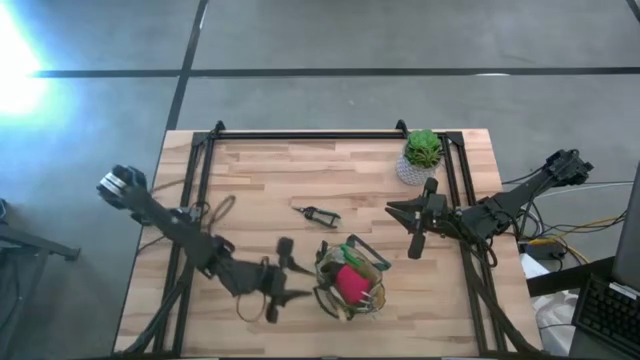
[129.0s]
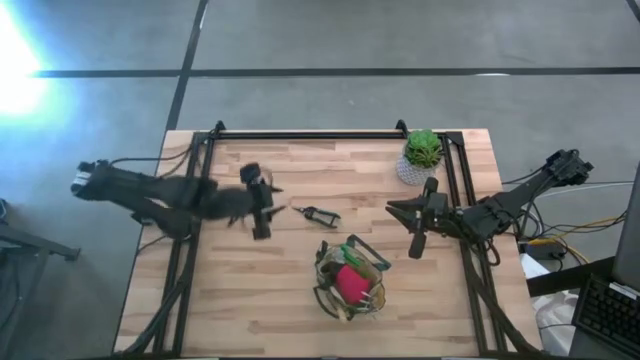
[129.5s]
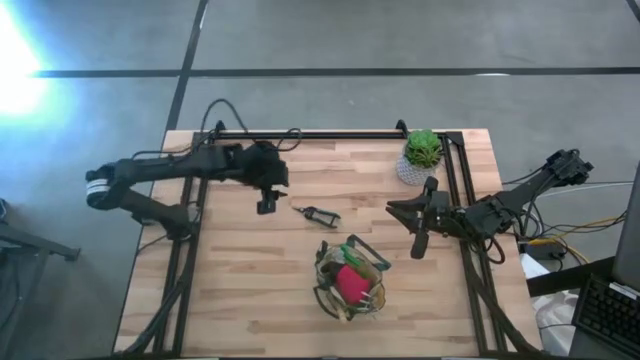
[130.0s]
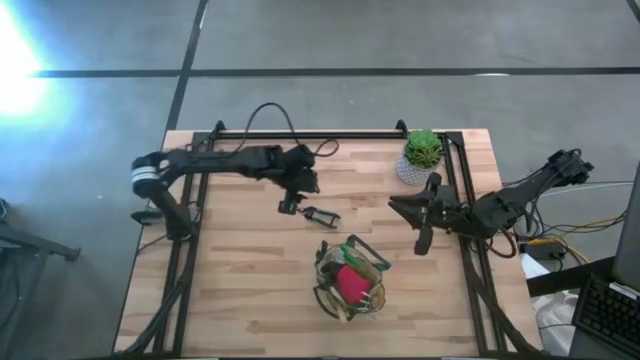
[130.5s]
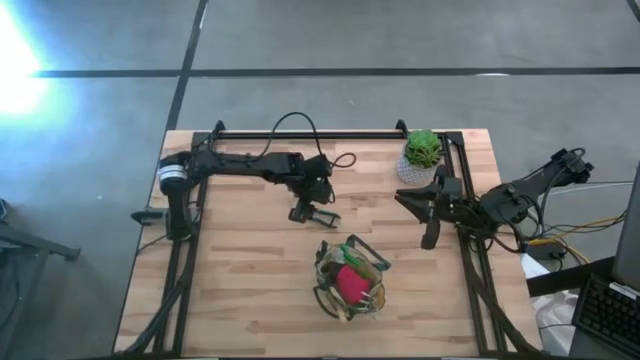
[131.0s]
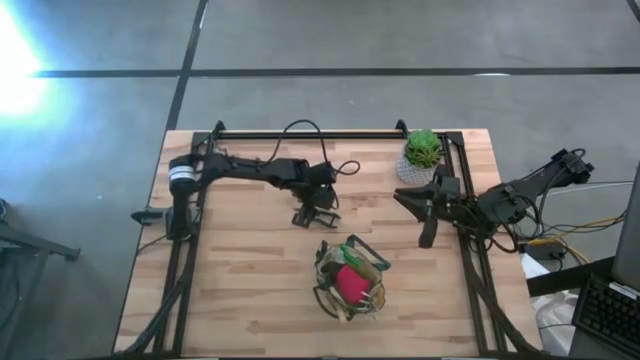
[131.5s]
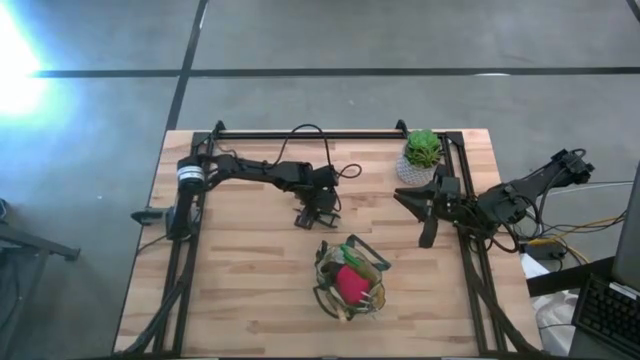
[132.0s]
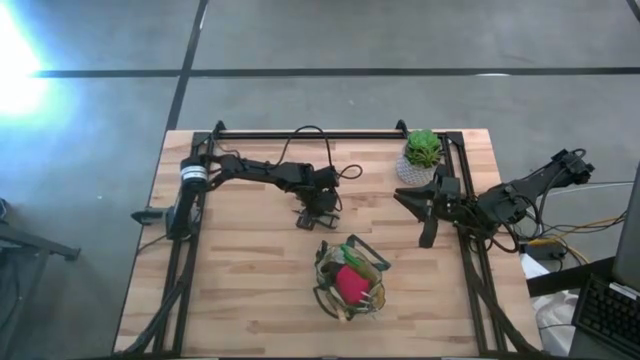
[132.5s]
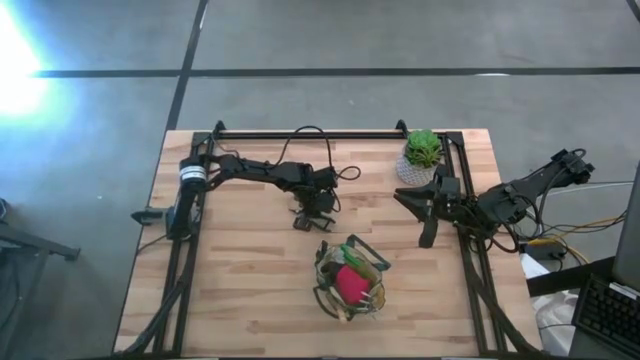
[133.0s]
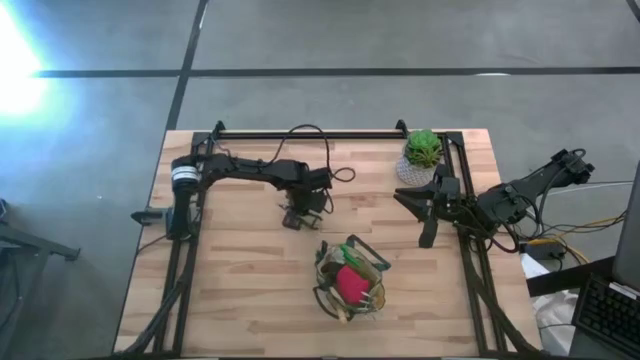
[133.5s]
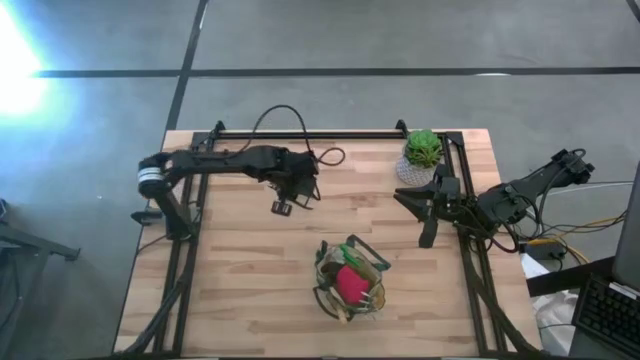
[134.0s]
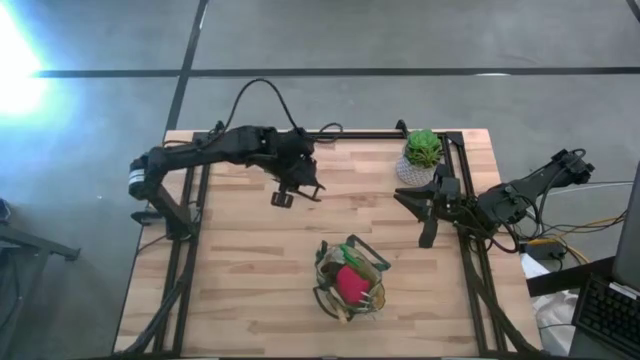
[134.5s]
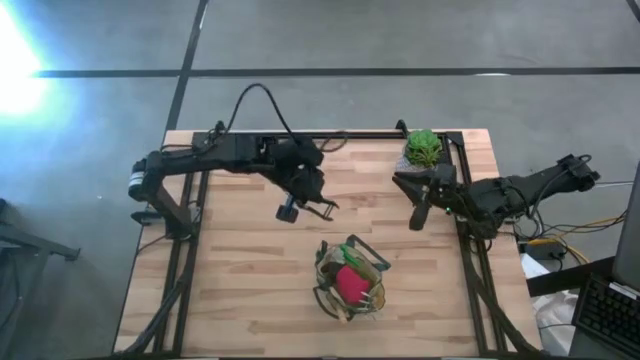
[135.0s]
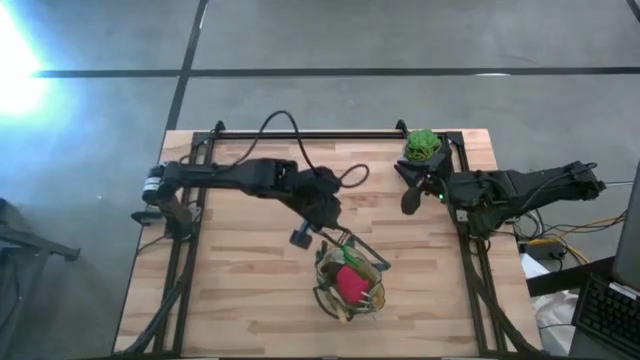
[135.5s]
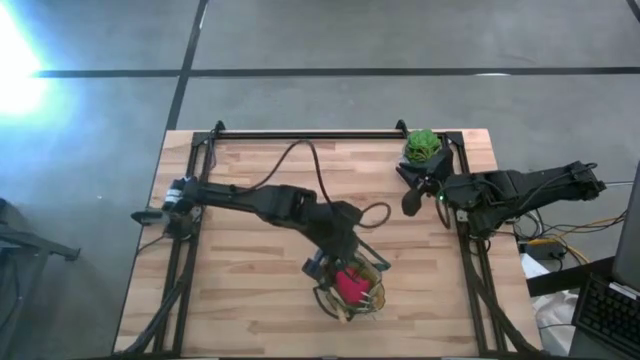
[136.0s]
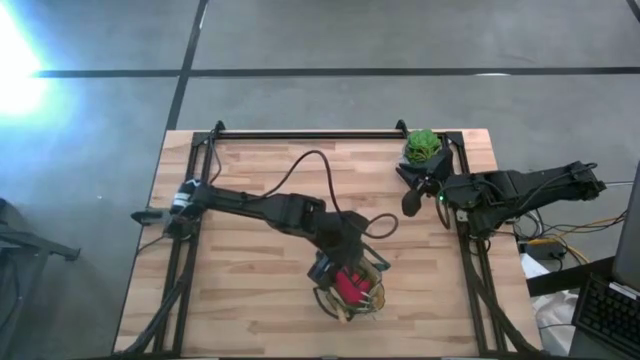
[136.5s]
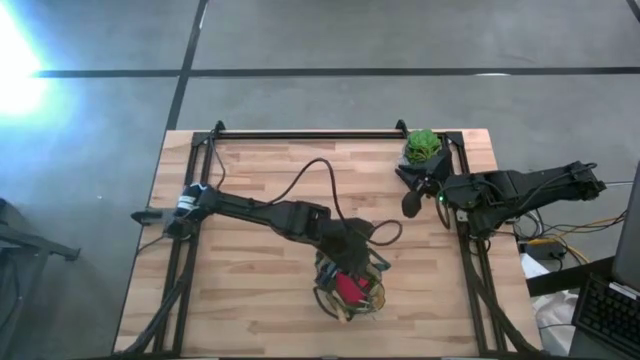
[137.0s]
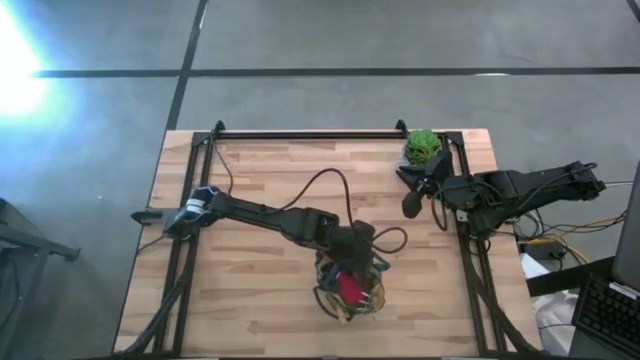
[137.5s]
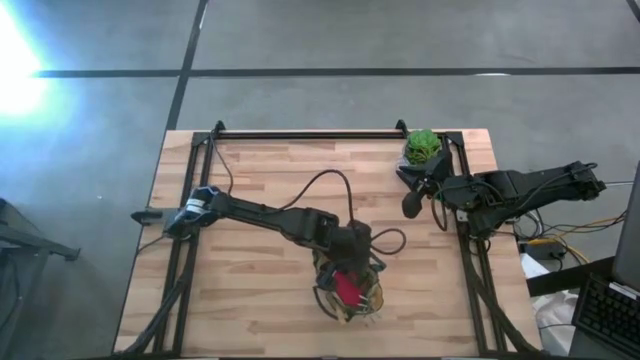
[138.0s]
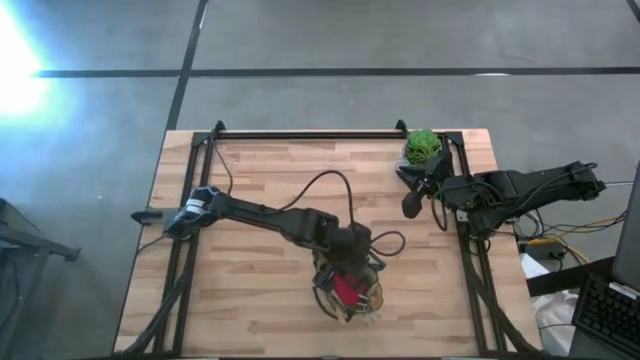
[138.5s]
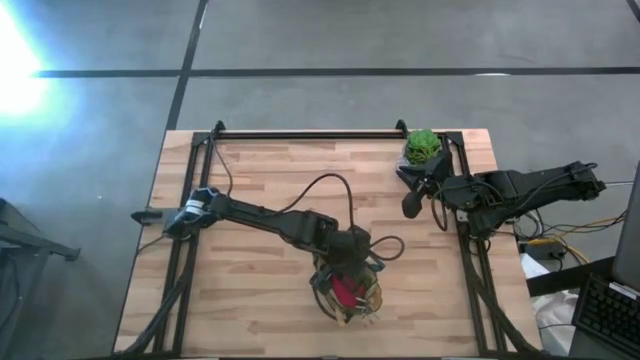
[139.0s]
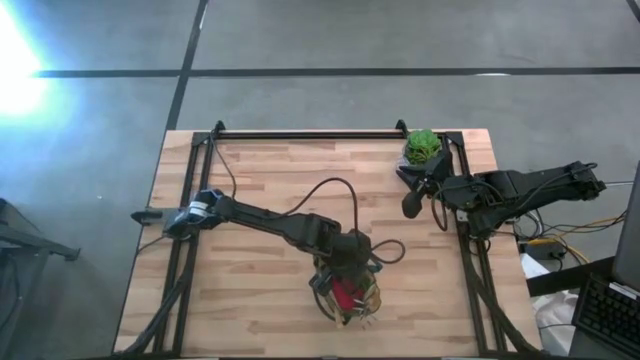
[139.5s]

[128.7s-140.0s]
Task: Pick & Place Garden tools in Gardening bag
Put the green shear scissors into the white gardening bag

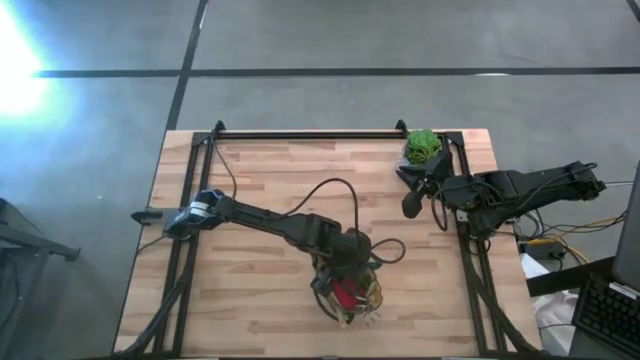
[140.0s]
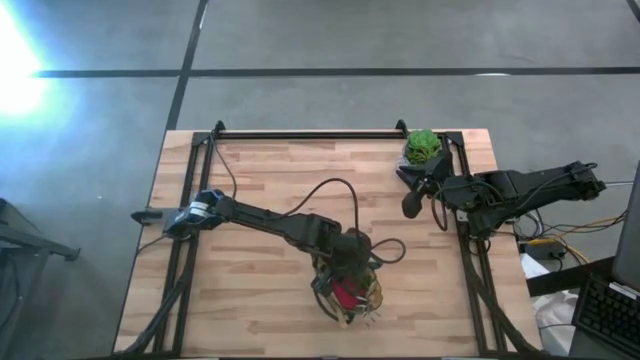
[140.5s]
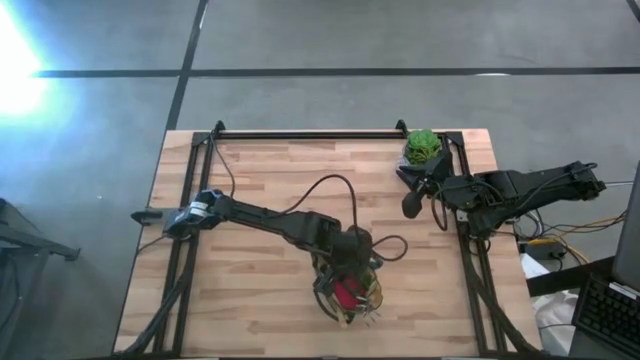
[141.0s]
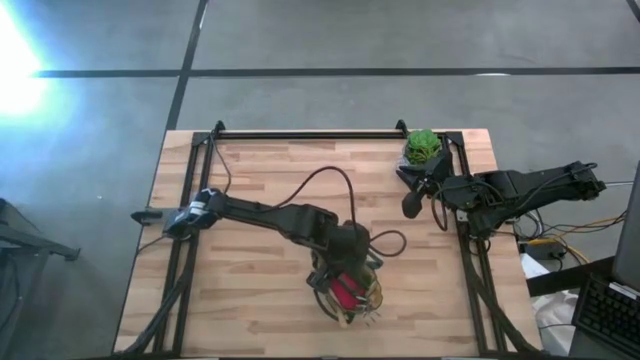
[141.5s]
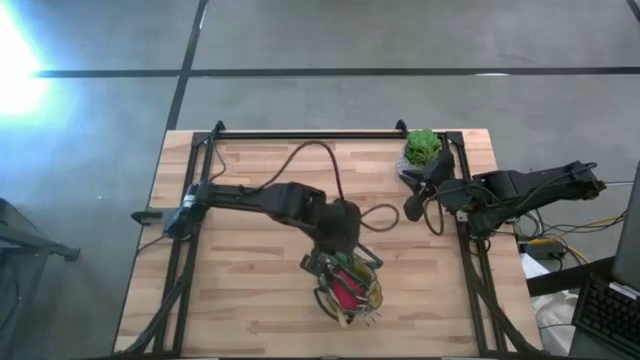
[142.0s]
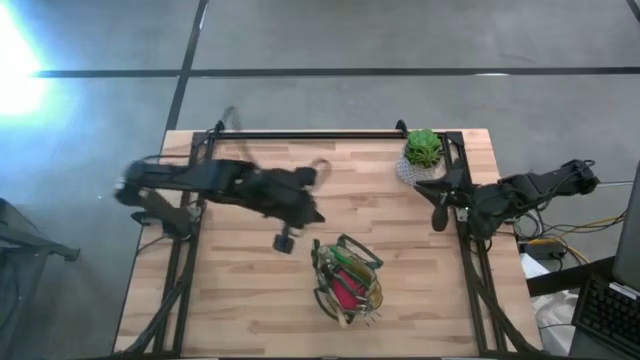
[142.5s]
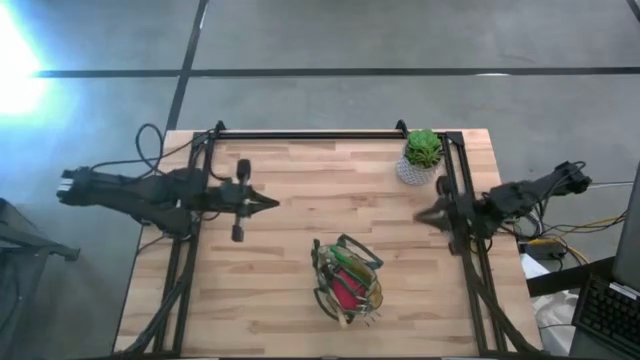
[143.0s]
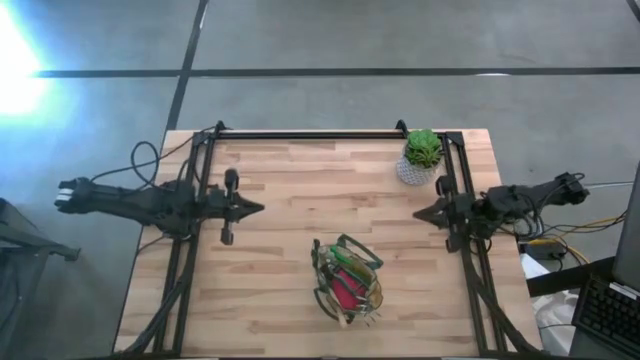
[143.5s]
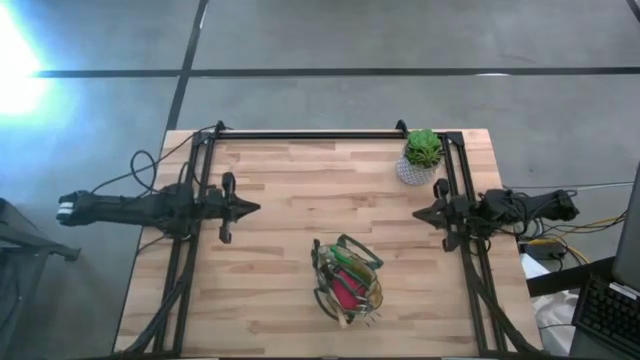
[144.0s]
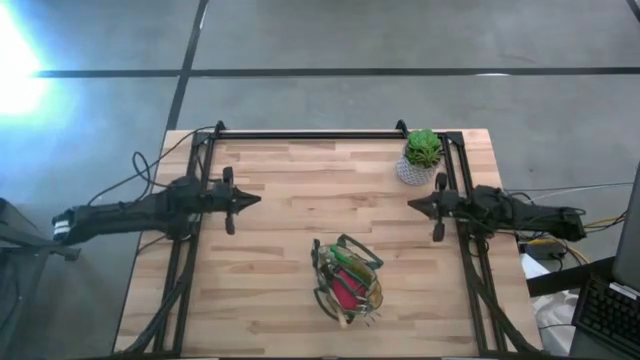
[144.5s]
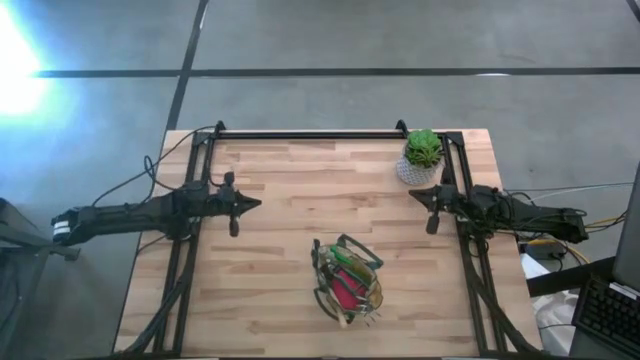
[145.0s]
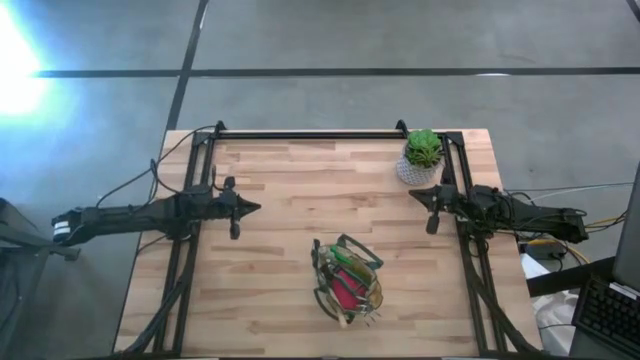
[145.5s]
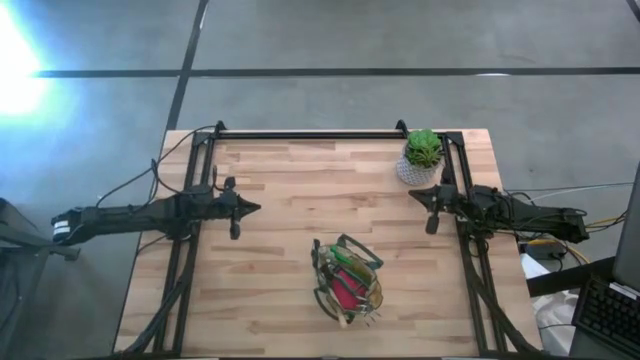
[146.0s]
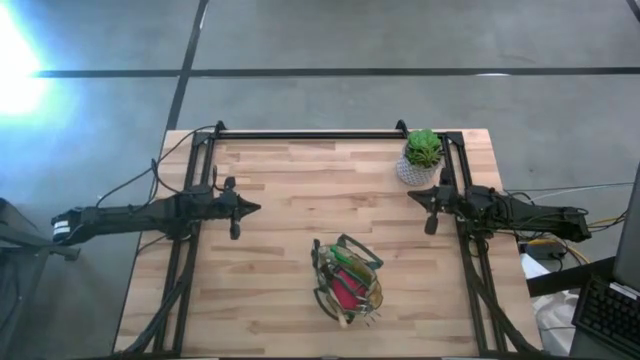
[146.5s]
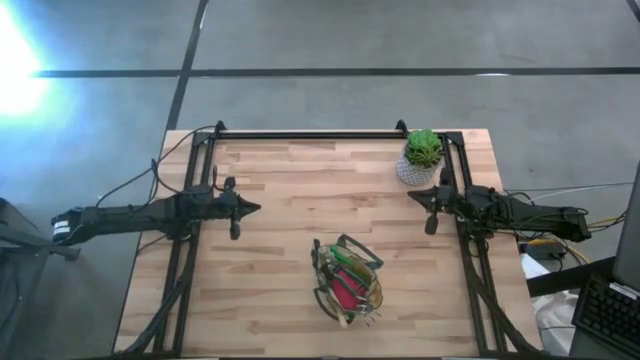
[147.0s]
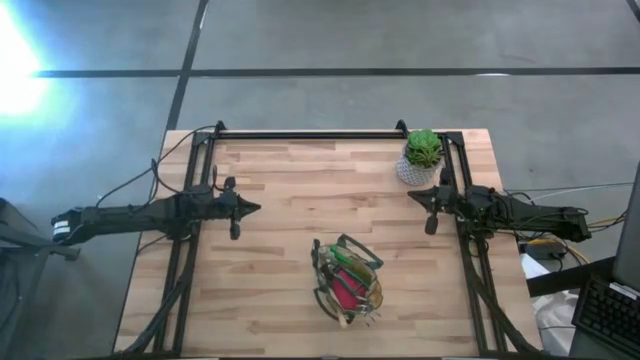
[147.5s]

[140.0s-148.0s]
Return to Home Position

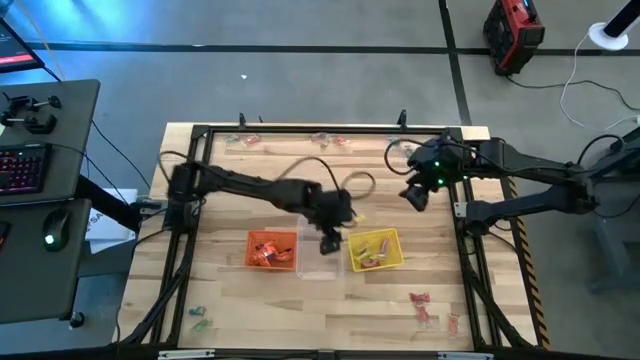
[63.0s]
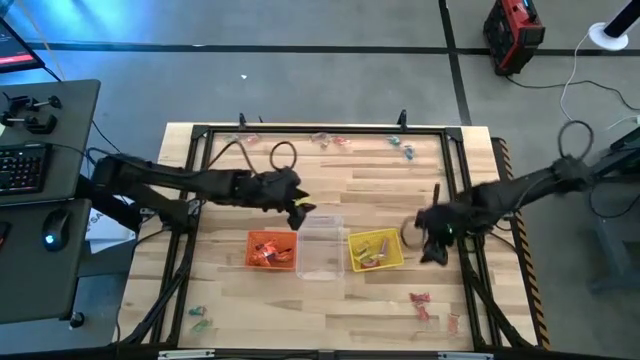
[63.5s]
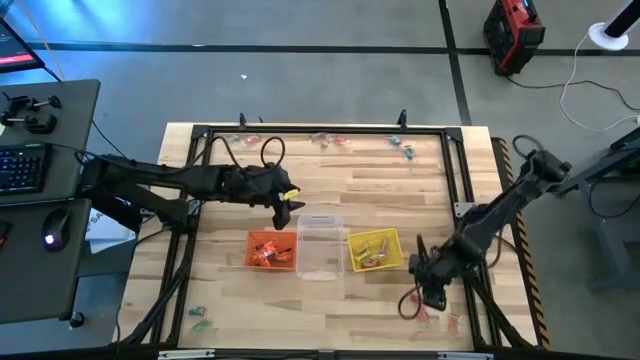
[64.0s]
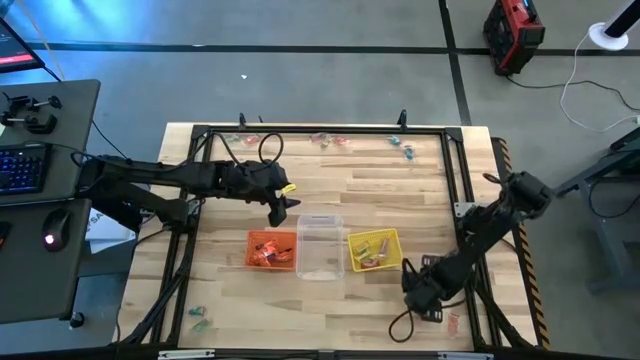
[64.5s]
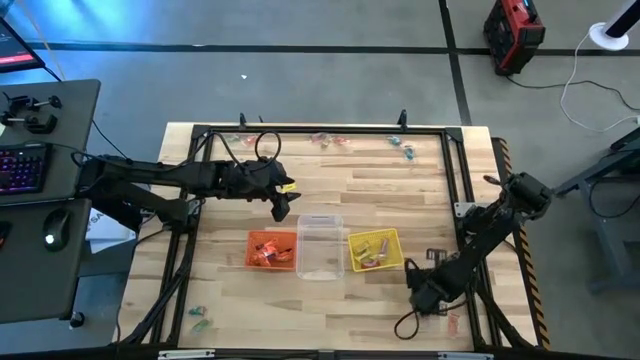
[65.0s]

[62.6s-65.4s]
Task: Sort candy by brand, put in halloween buckets
Put the red candy into the yellow bin

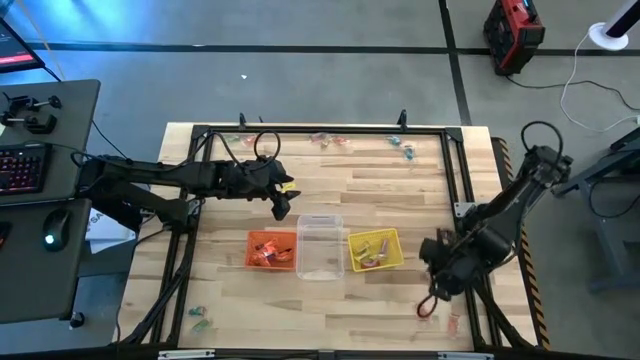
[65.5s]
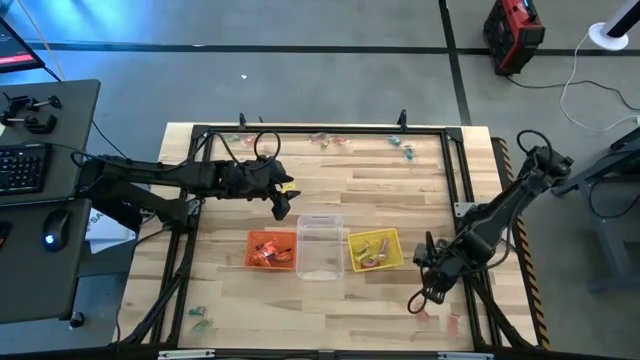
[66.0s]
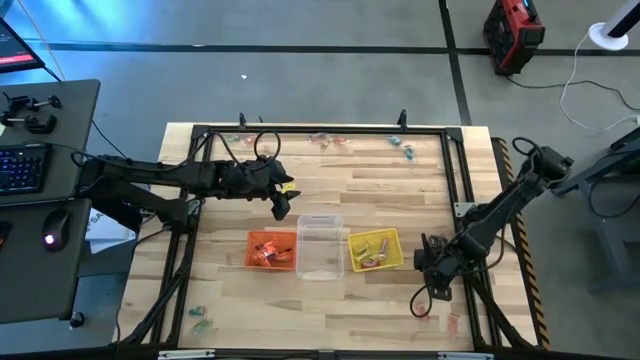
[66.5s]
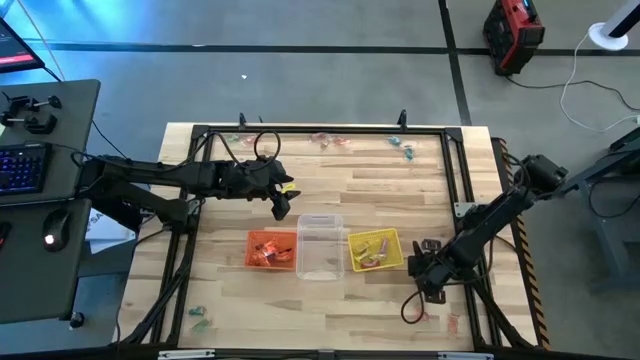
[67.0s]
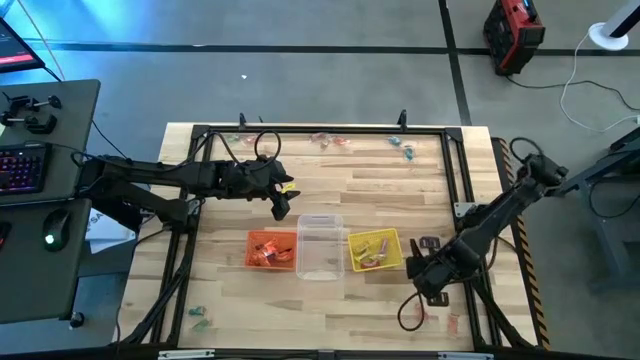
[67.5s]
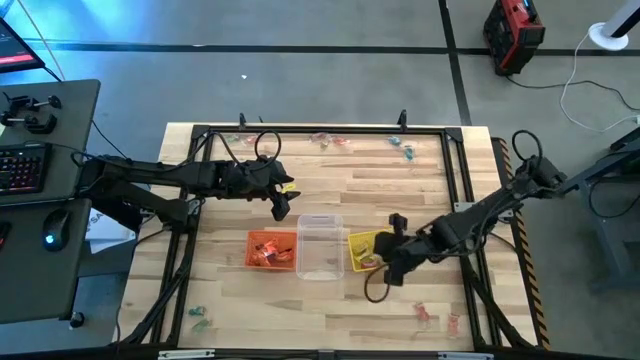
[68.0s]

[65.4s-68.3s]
Put the red candy into the yellow bin
